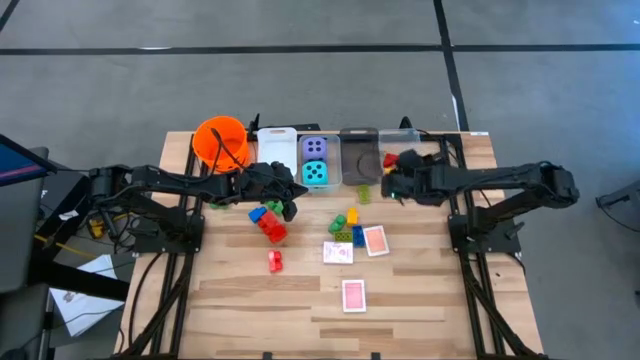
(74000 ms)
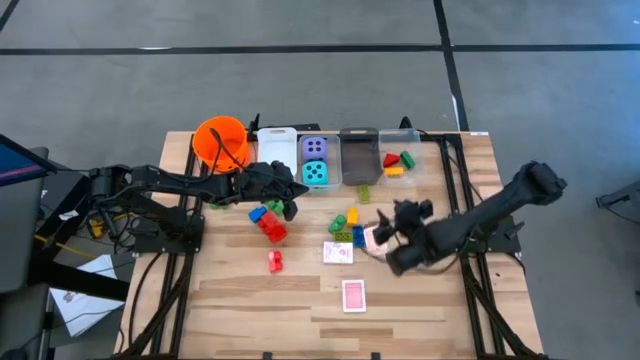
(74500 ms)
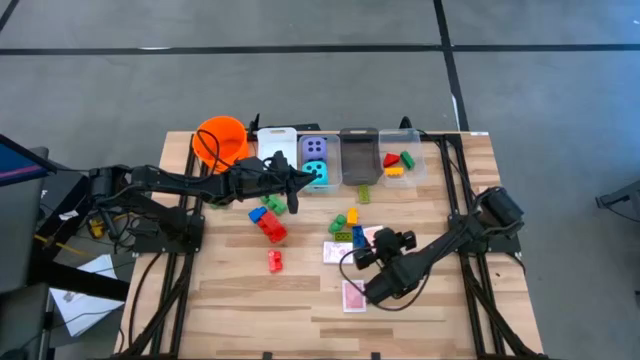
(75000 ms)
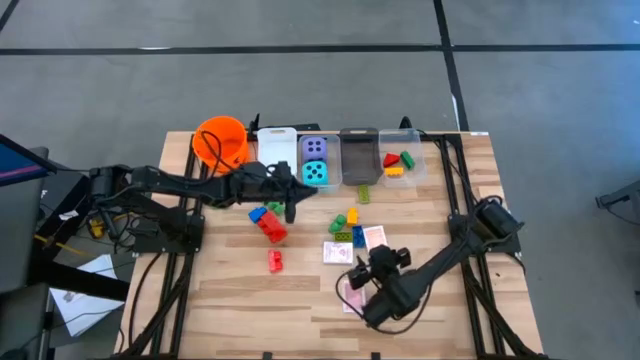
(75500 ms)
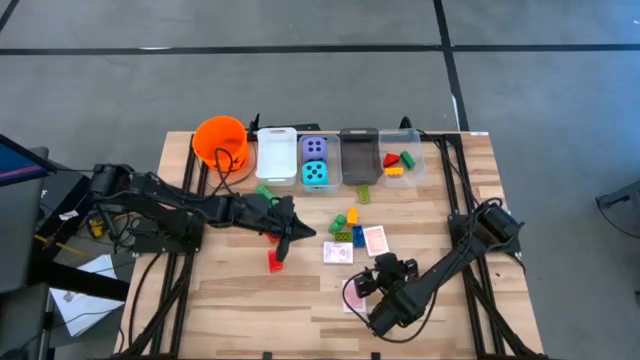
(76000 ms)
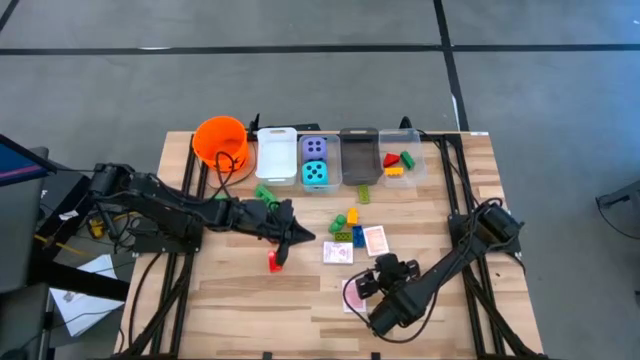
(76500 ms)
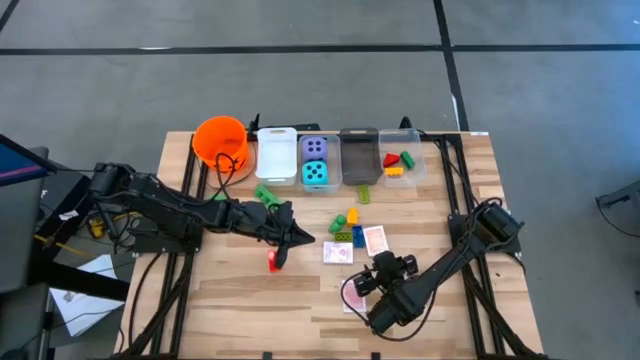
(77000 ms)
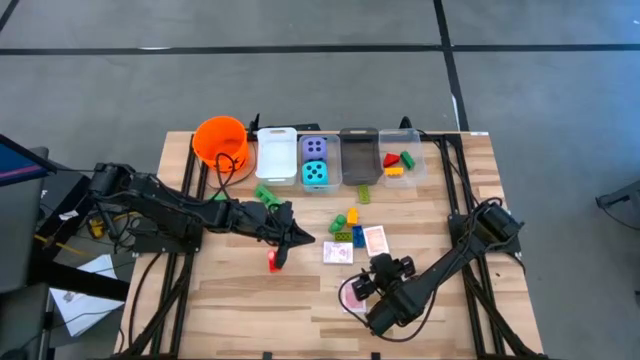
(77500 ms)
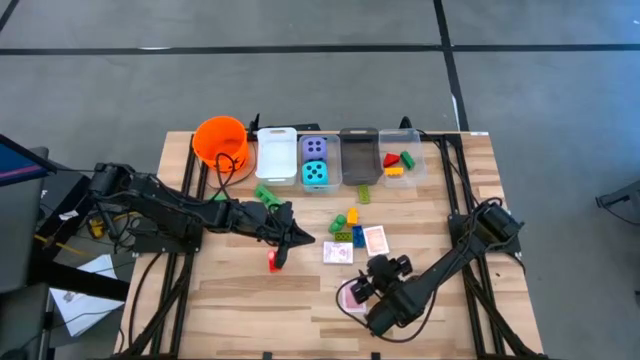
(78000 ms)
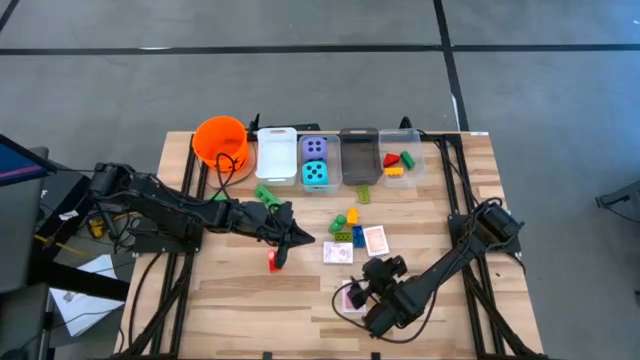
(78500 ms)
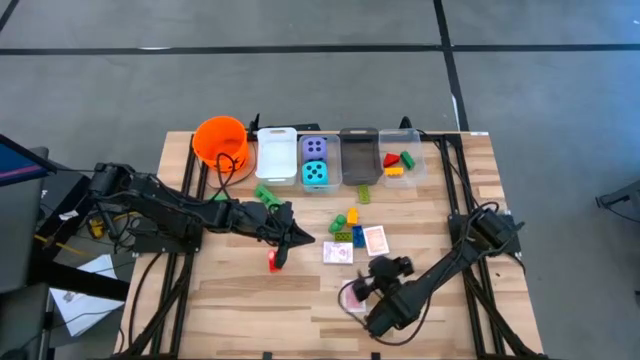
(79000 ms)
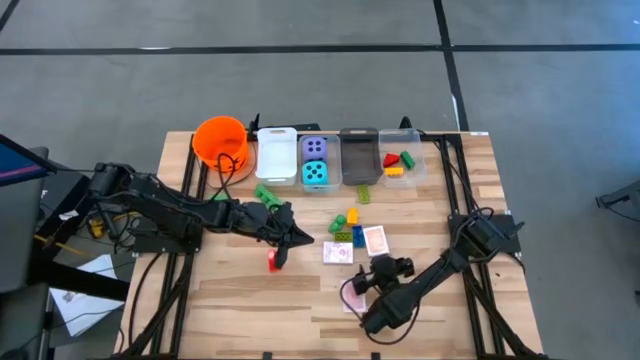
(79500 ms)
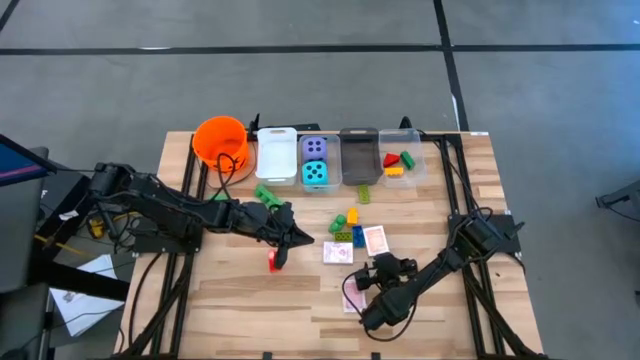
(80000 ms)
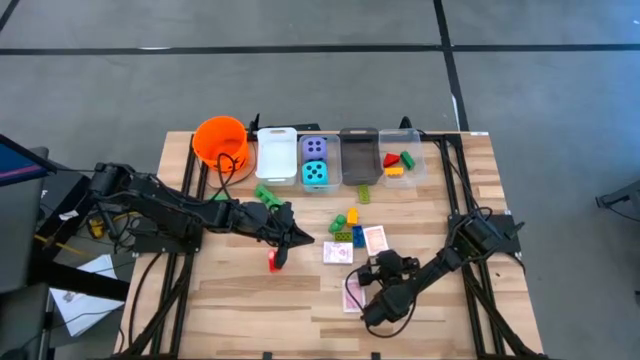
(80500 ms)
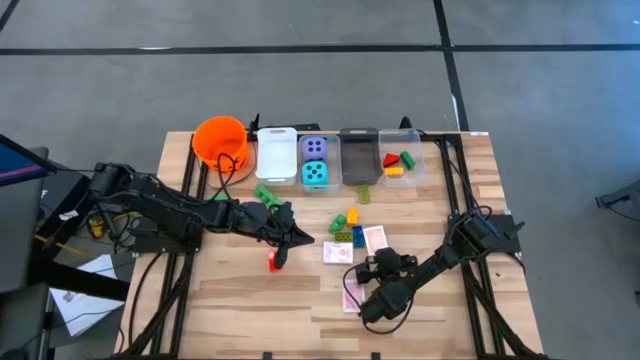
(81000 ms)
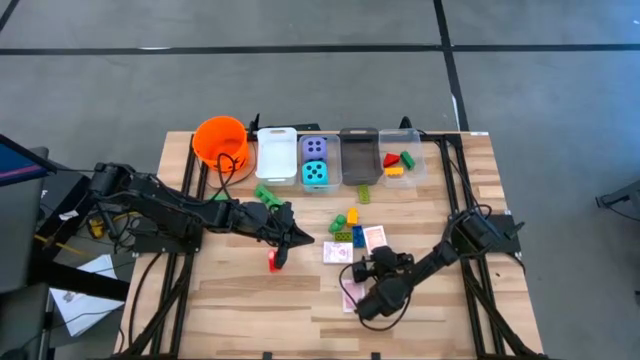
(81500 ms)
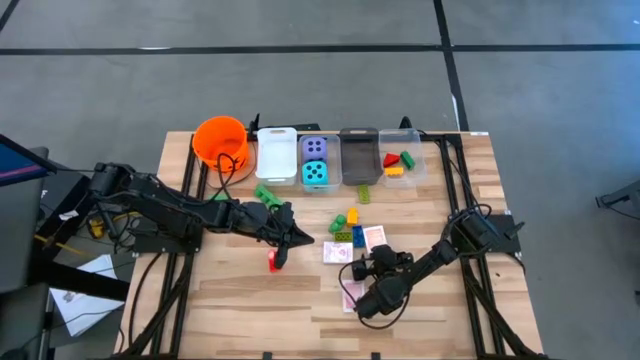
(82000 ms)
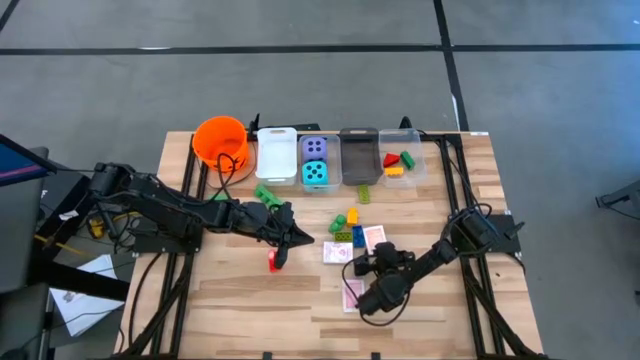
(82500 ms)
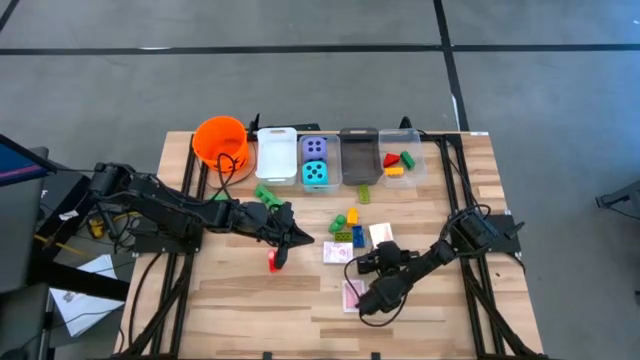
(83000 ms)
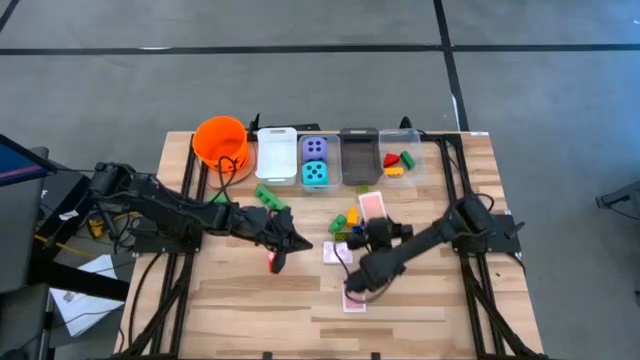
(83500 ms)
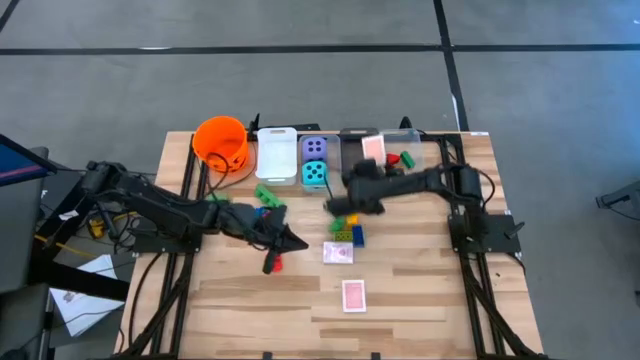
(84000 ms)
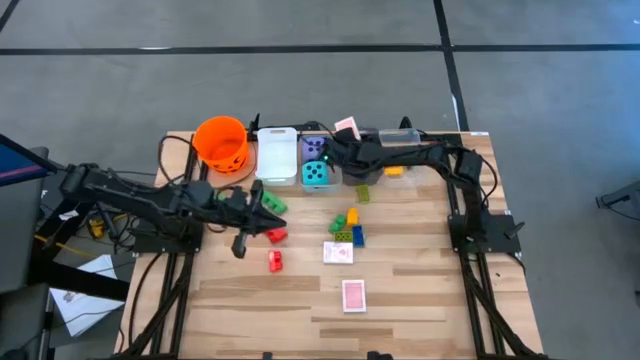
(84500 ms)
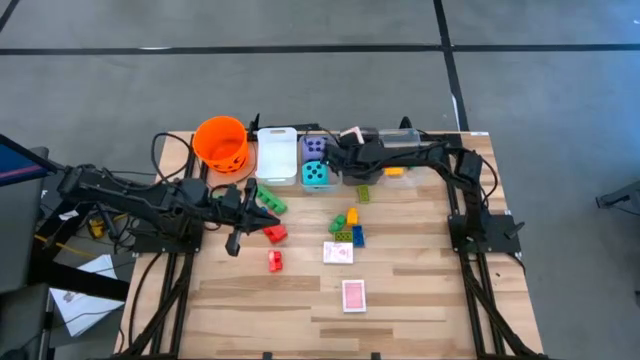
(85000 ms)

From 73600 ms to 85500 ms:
Task: Pick & Place Toys
Put the orange deck of cards into the black bin

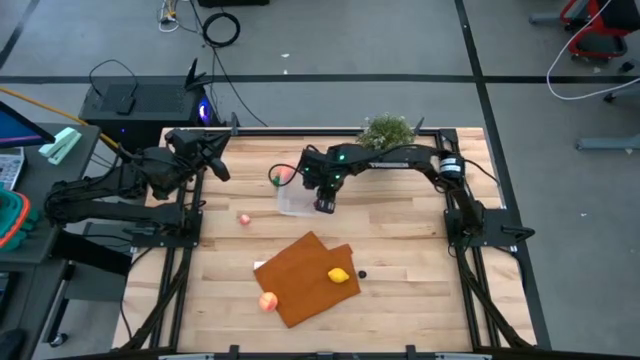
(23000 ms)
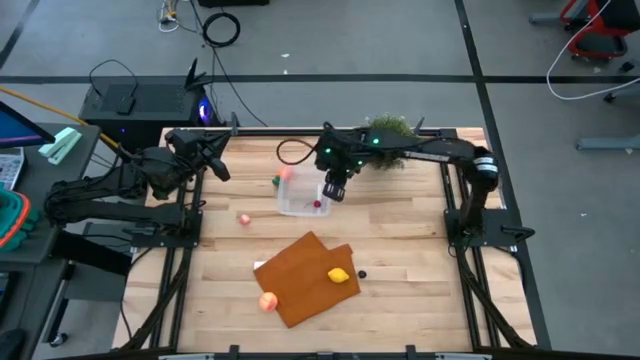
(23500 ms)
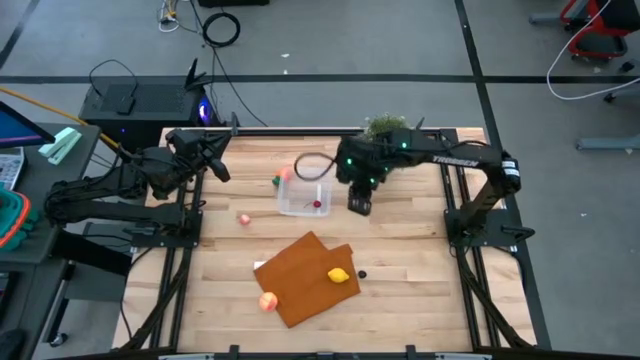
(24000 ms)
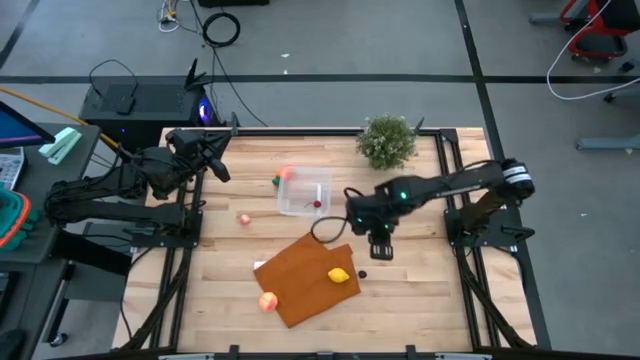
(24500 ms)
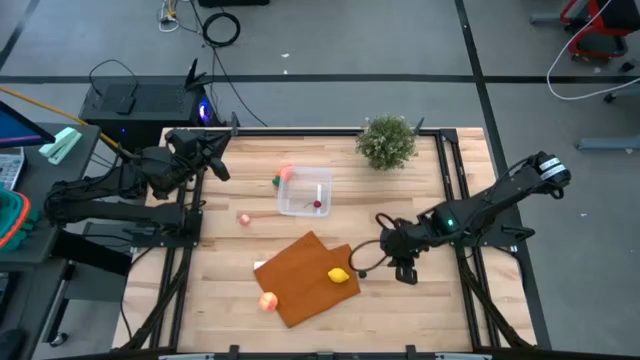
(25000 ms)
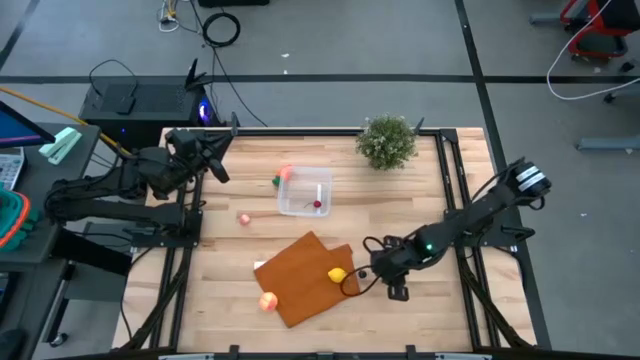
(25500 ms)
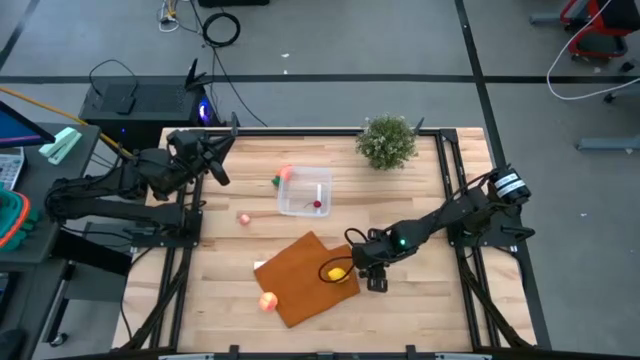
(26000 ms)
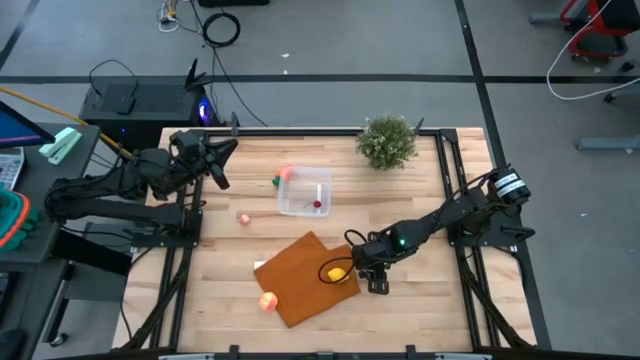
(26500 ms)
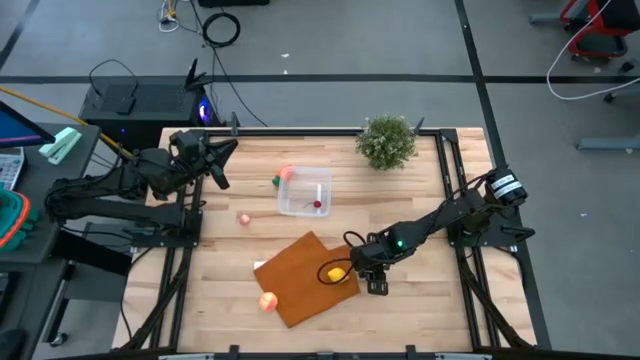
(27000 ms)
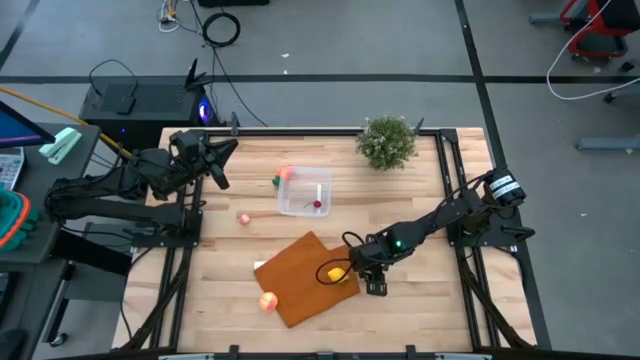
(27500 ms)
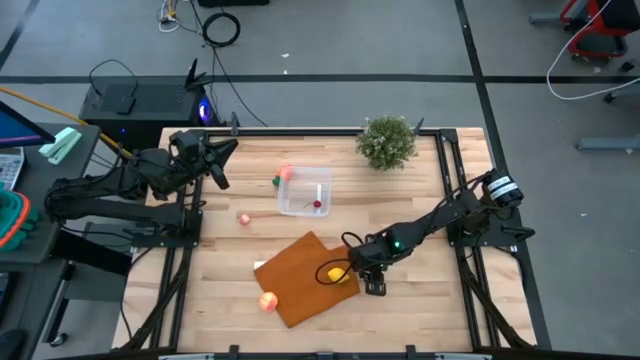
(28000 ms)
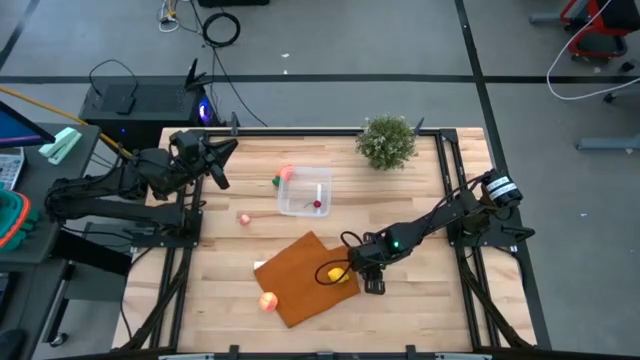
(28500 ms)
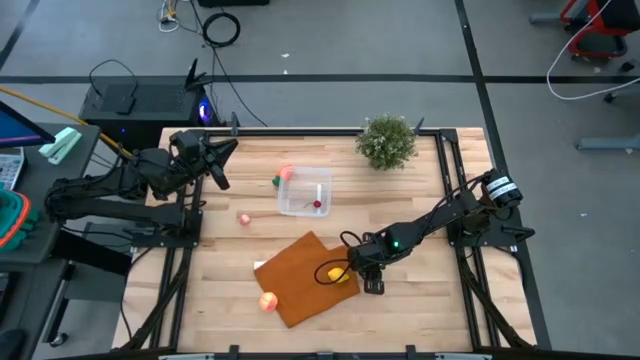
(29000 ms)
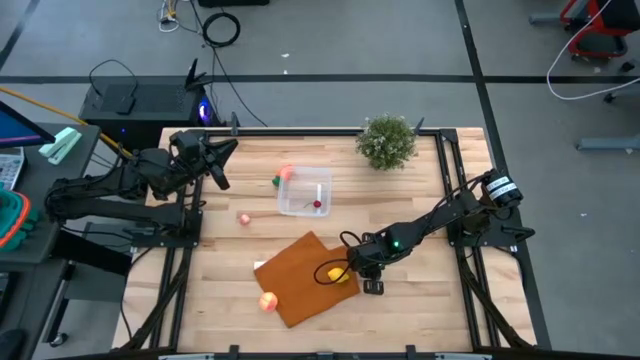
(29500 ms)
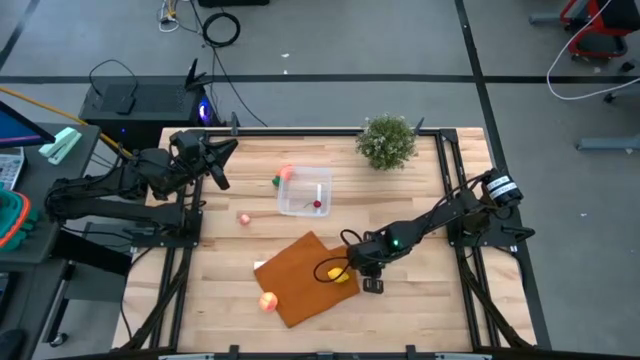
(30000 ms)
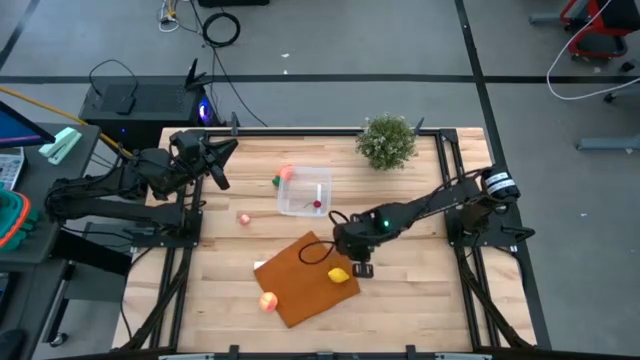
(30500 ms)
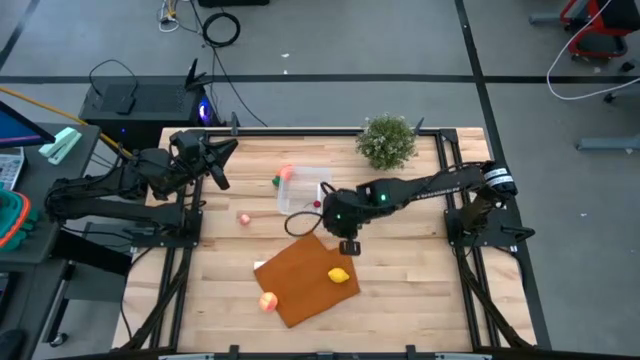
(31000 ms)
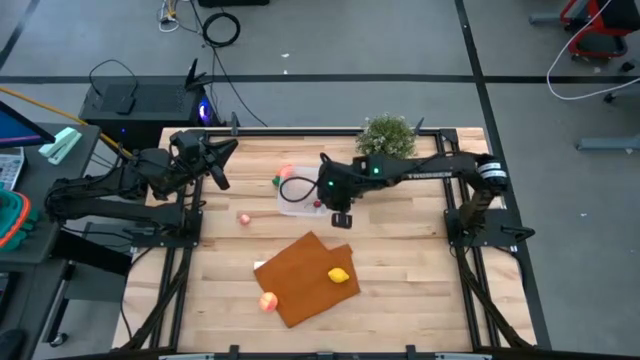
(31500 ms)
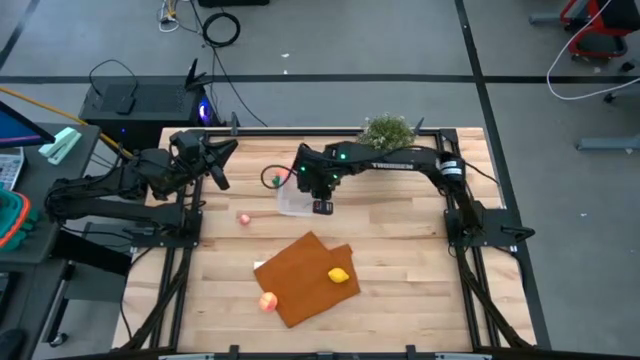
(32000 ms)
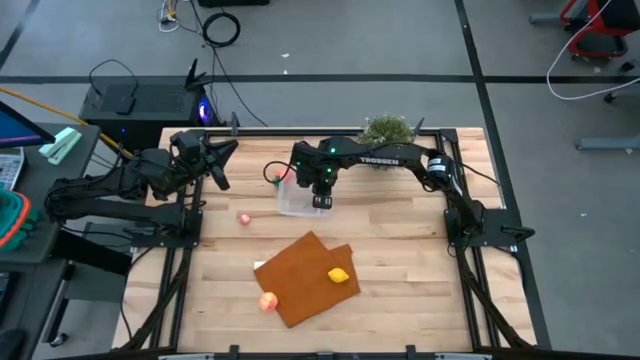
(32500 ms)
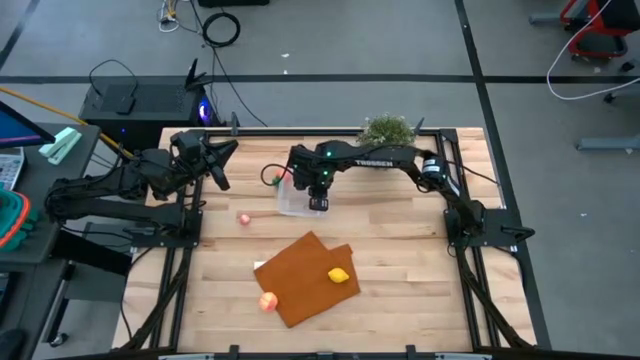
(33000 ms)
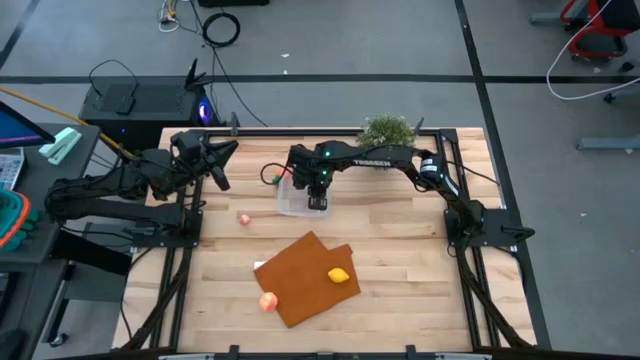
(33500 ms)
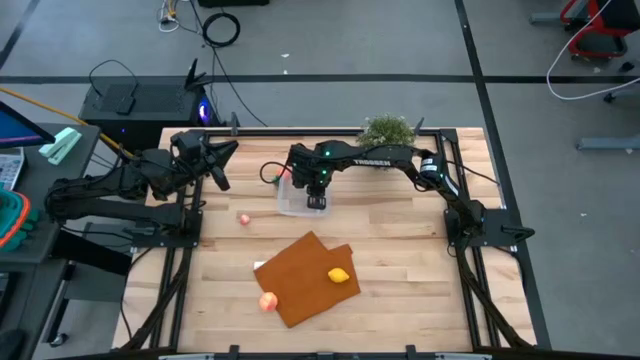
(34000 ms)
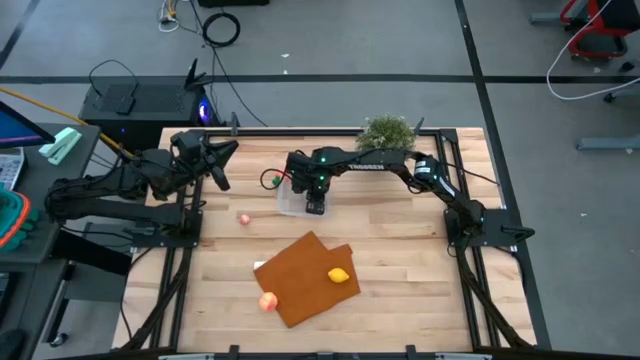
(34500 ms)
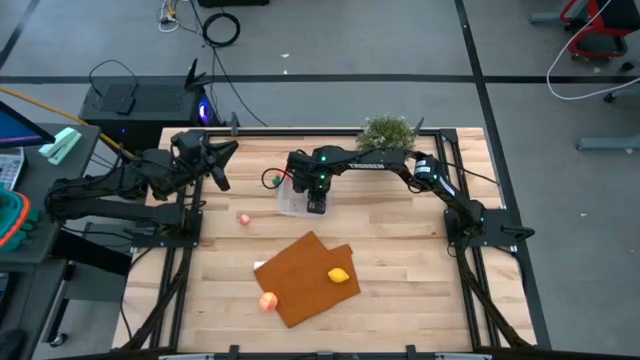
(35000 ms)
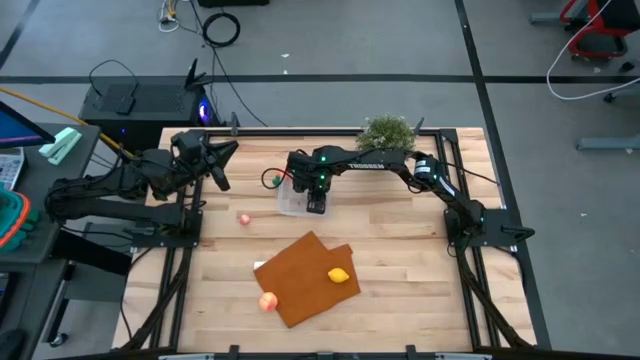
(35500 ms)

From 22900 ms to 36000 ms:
Task: Pick and placing Produce into tupperware
Put the black cherry into the transparent bin
